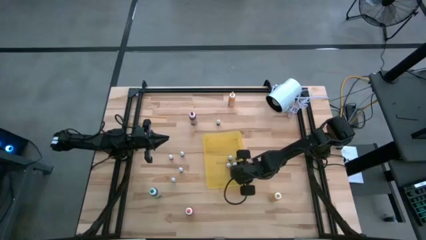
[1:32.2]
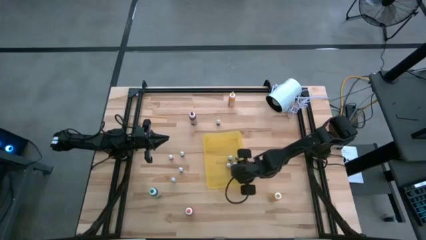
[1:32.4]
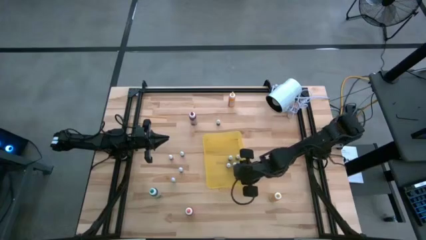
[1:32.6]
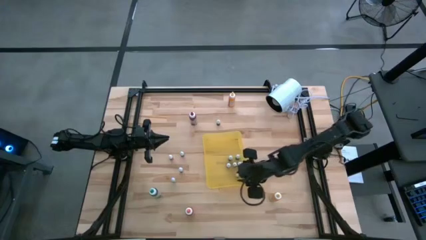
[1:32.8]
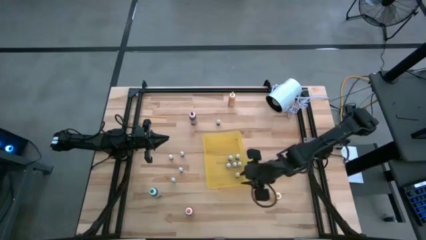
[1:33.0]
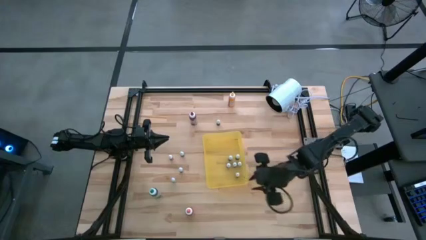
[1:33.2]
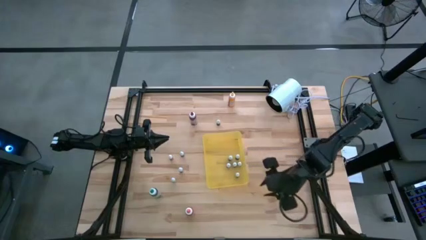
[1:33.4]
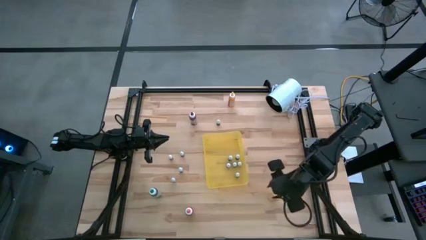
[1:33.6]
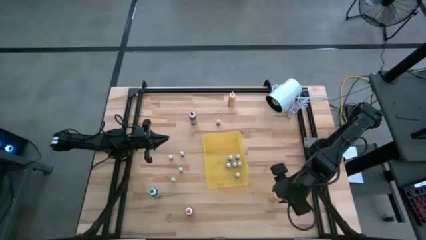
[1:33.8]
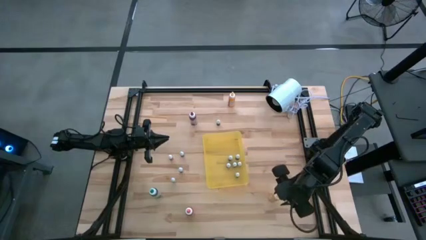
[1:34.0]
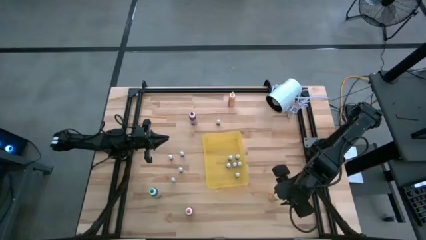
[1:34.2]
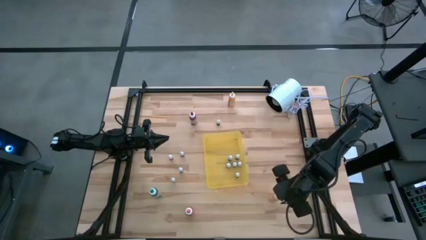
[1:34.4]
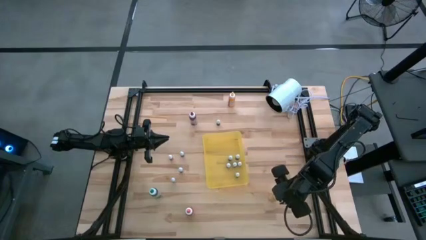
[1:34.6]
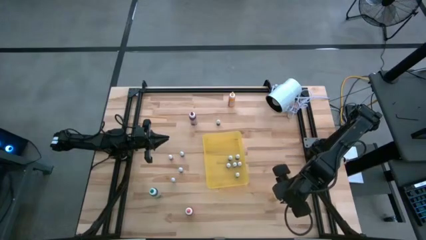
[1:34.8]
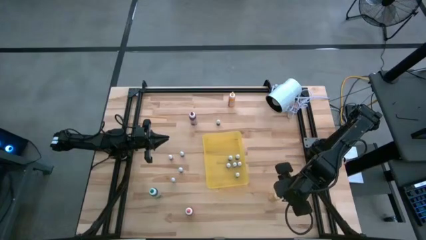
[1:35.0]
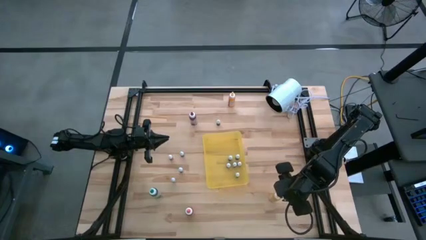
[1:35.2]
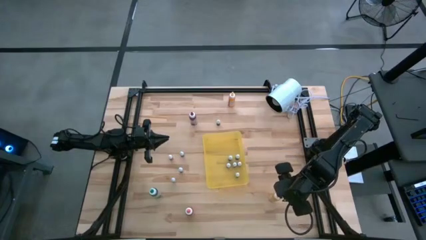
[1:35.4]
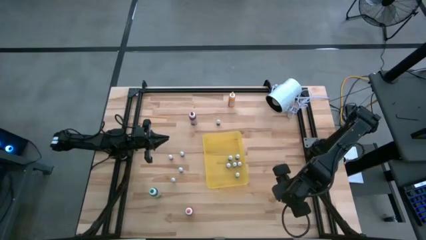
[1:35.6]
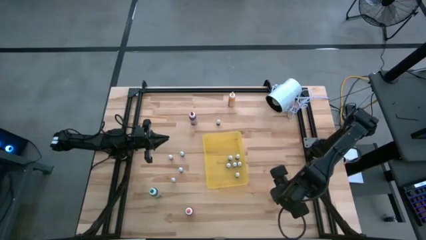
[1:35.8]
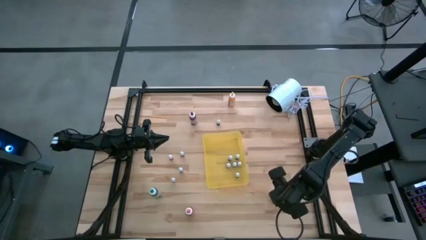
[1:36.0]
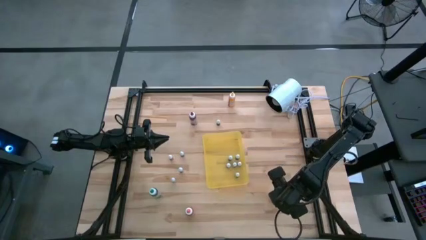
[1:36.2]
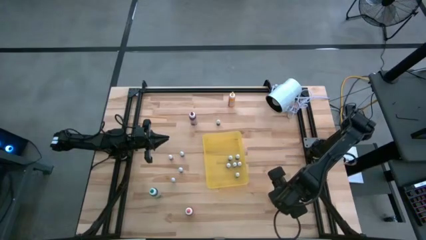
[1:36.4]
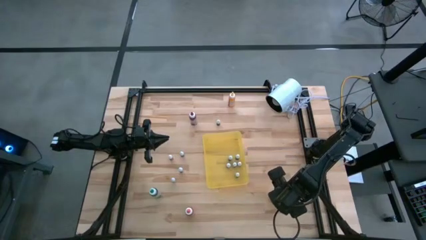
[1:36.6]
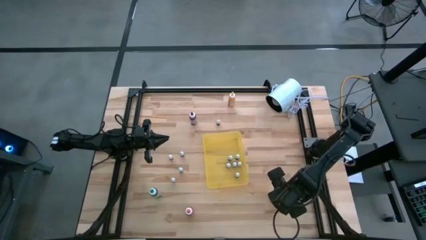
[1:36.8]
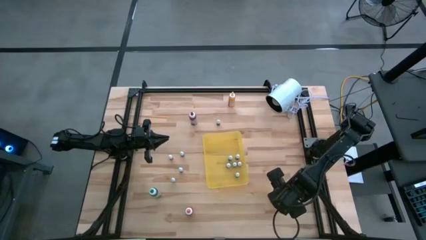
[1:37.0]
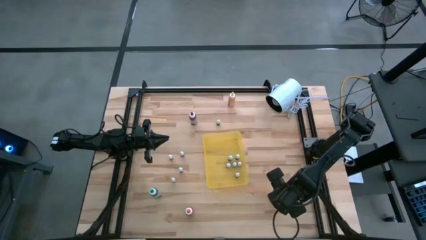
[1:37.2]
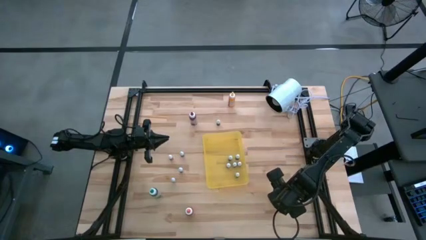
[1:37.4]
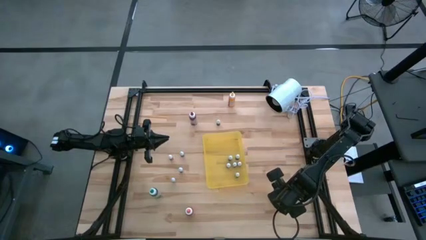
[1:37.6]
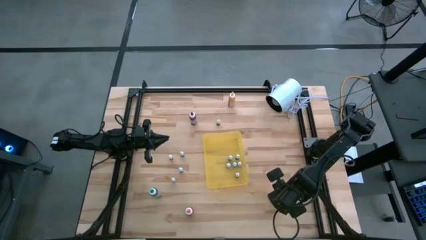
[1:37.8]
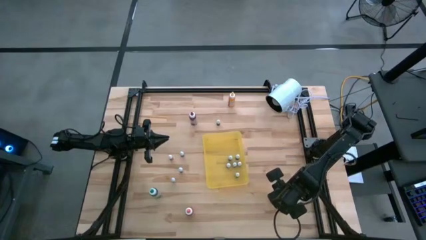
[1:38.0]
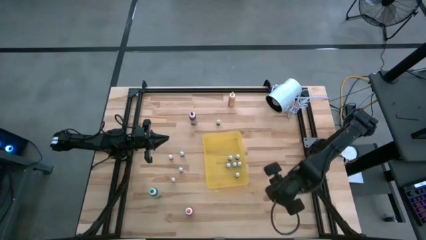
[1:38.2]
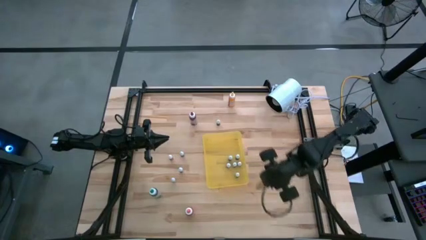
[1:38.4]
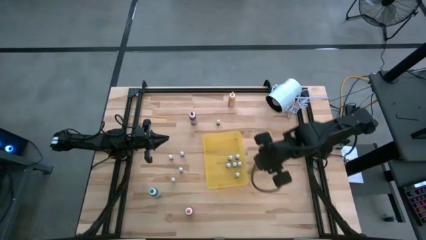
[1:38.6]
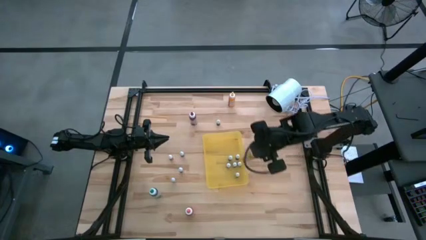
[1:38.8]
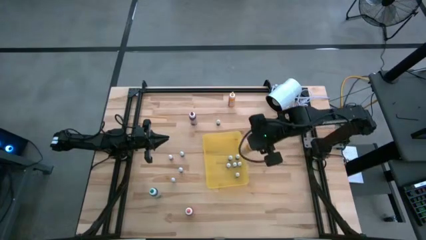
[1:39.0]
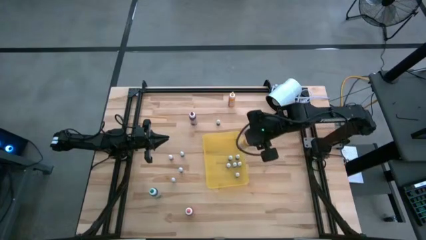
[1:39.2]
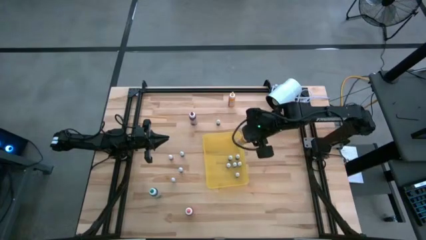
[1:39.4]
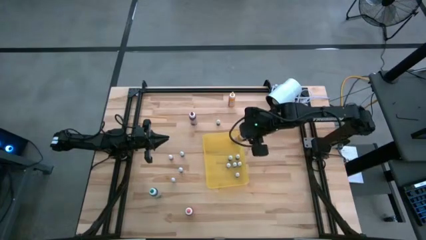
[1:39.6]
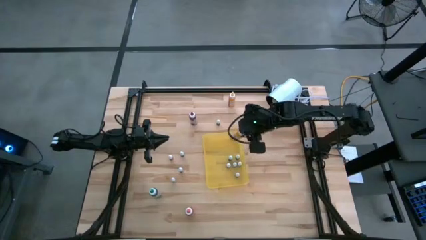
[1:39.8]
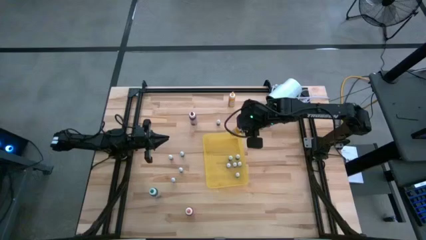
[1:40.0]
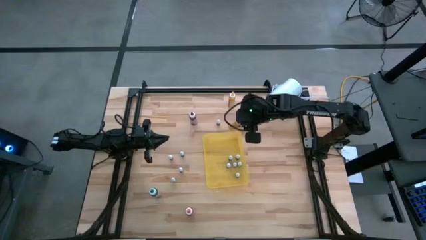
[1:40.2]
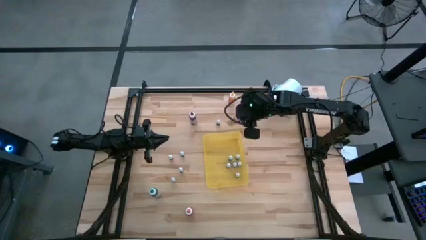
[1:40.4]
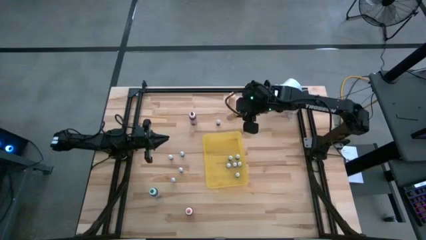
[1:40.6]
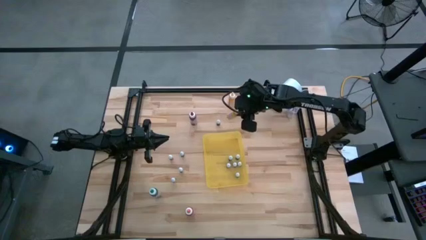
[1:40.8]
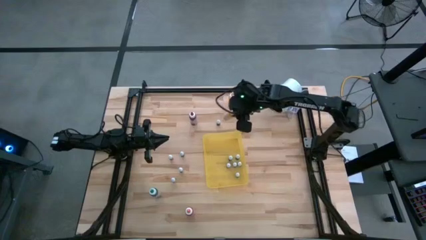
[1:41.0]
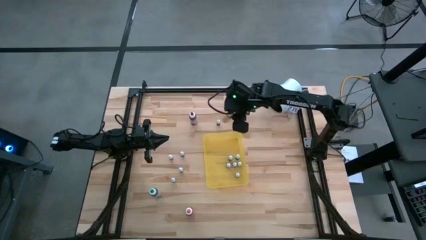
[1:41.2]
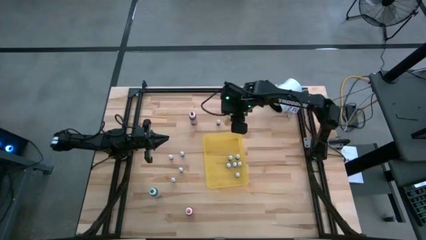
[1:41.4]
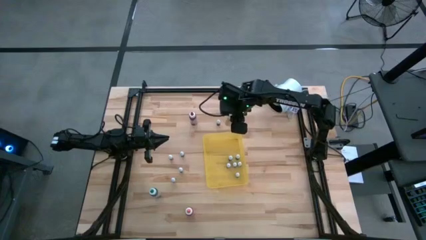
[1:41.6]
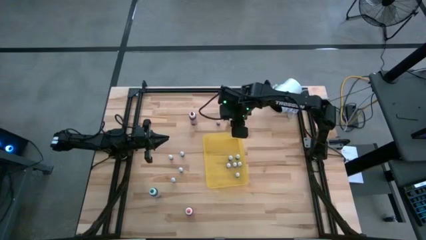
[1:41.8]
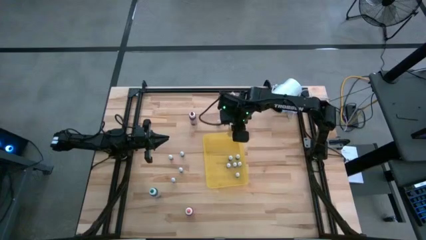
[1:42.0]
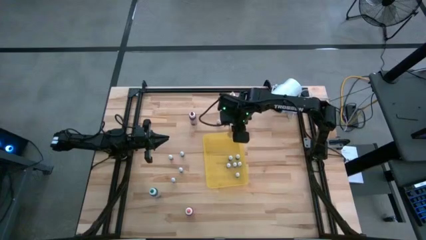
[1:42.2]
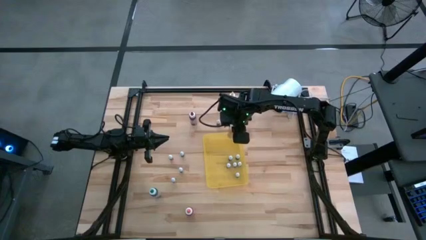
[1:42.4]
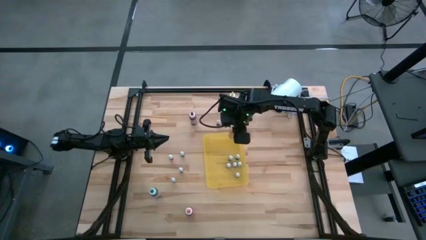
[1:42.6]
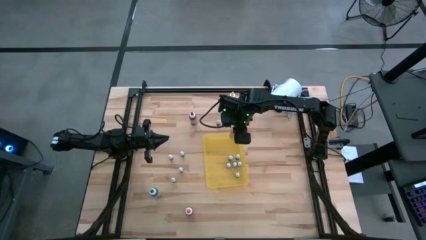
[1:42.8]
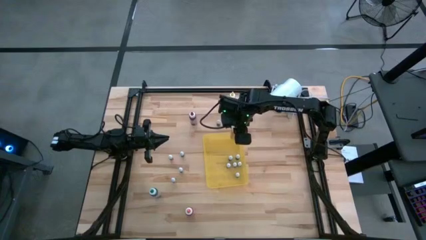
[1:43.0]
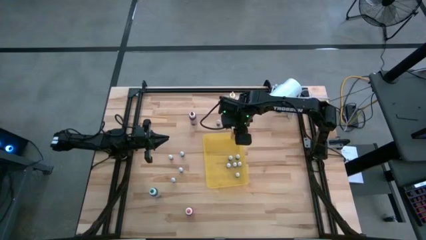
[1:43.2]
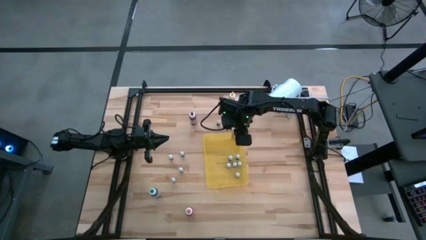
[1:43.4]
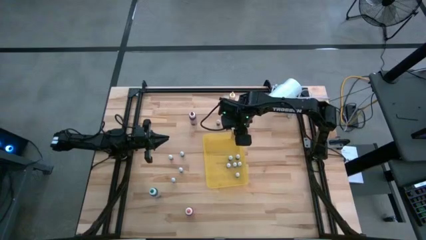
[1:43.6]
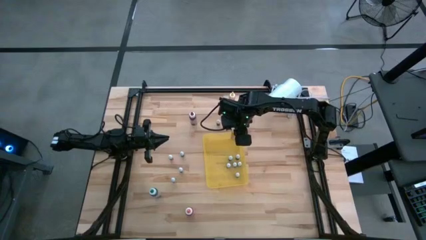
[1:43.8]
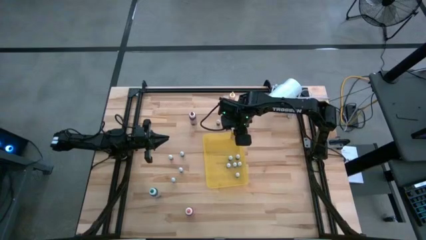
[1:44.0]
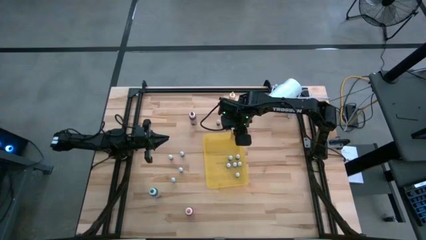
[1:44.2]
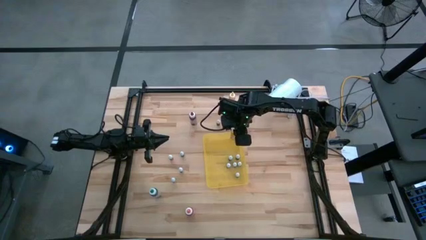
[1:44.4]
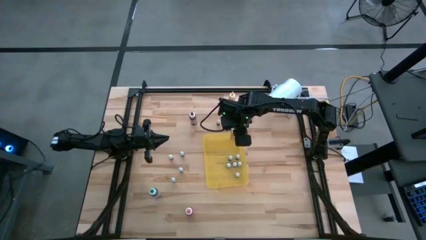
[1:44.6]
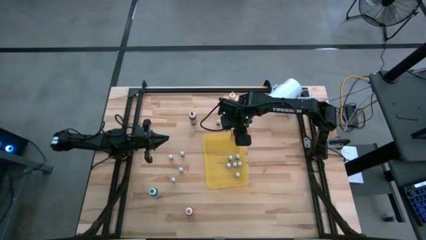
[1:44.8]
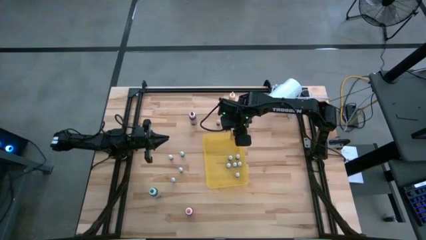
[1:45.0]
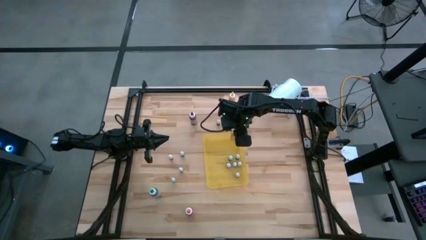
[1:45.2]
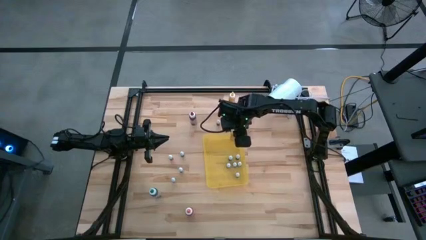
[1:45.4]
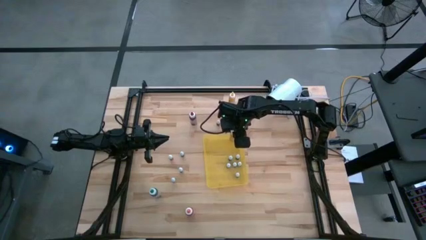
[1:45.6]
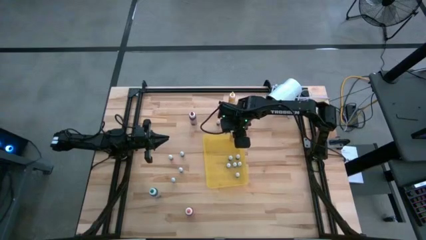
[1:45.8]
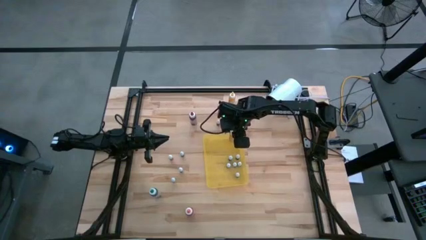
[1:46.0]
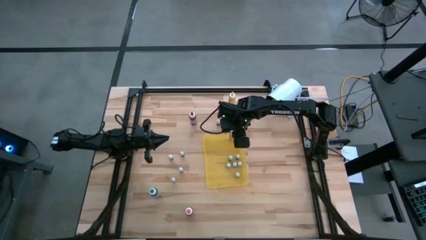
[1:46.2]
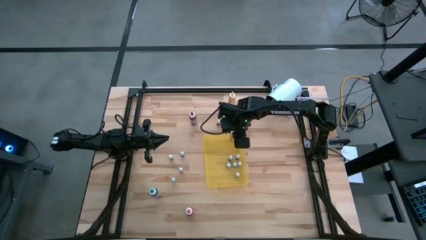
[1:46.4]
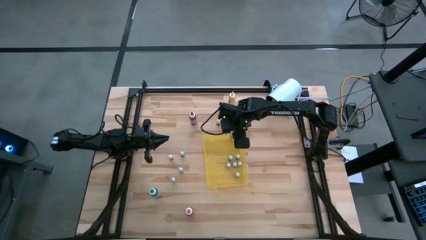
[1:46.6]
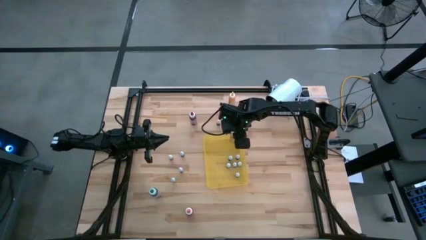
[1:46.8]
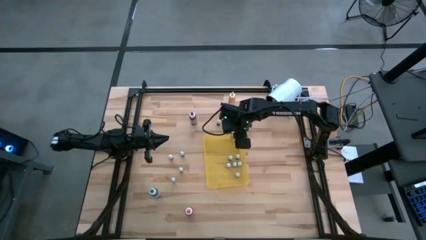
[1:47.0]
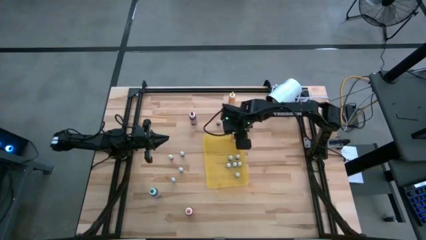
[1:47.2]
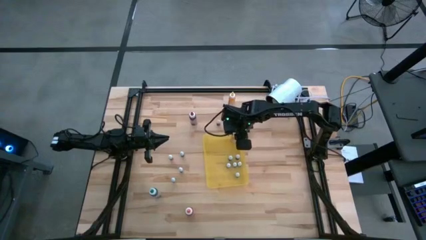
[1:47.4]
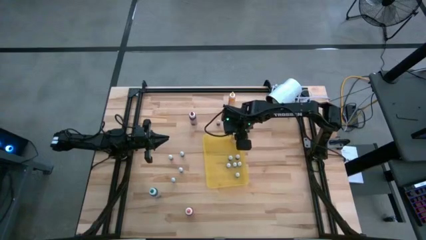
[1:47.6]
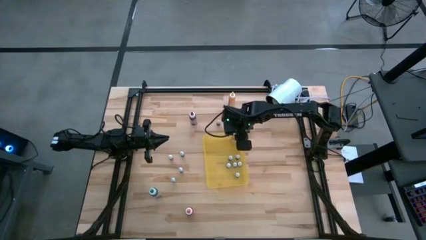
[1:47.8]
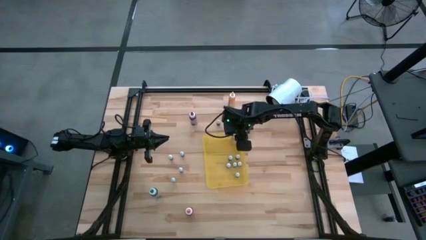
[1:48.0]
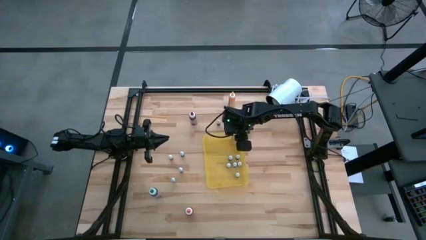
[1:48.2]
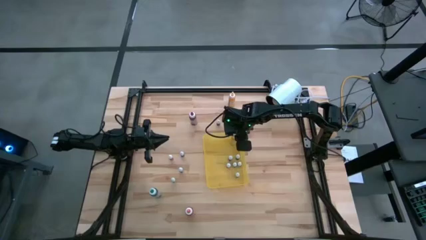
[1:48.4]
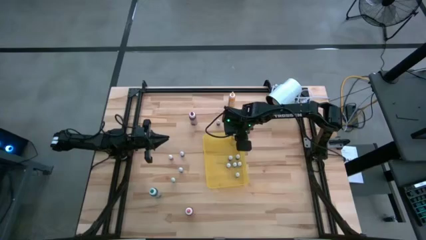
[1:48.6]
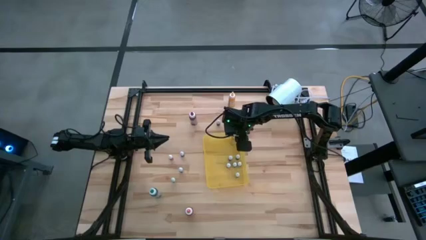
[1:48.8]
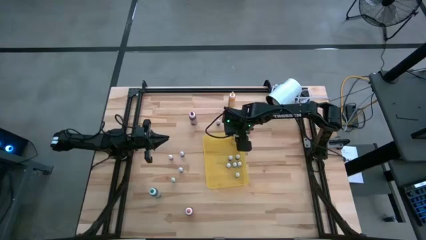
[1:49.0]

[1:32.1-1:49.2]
Task: Pick & Place food coloring
Put the bottom large yellow food coloring bottle into the yellow bin
